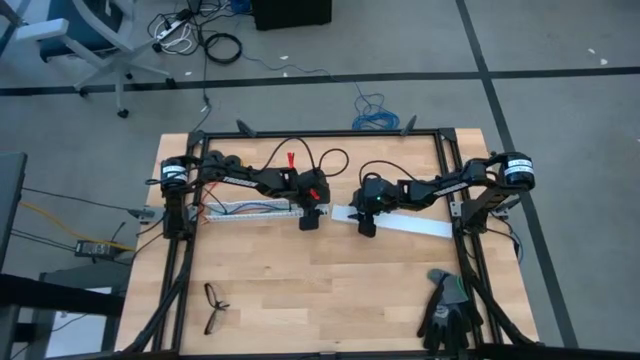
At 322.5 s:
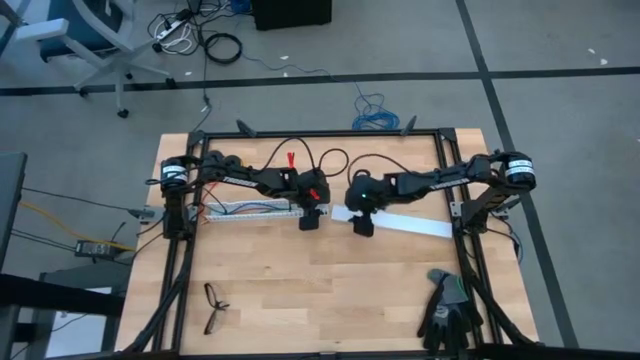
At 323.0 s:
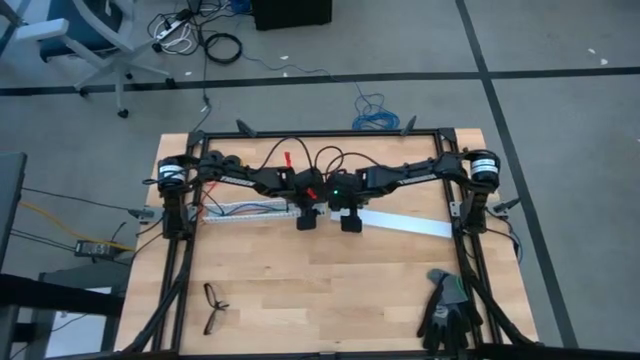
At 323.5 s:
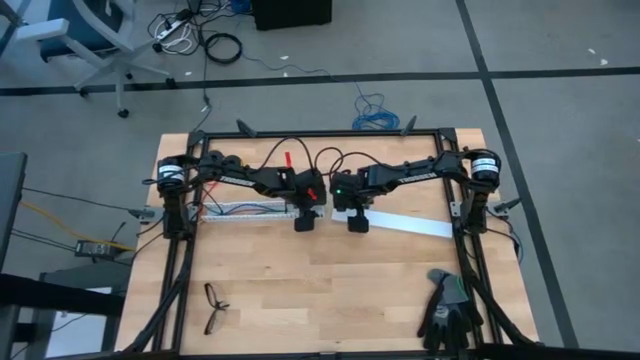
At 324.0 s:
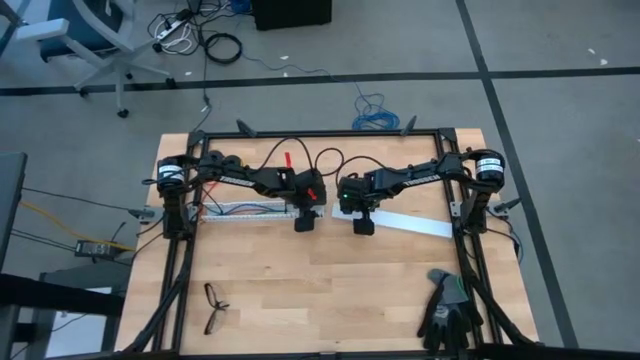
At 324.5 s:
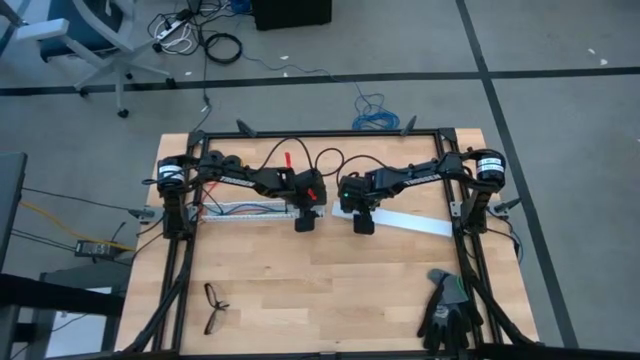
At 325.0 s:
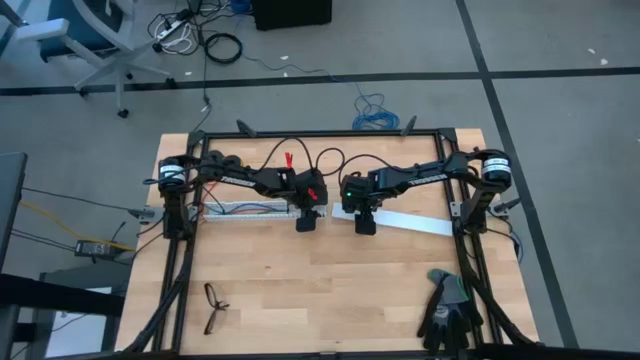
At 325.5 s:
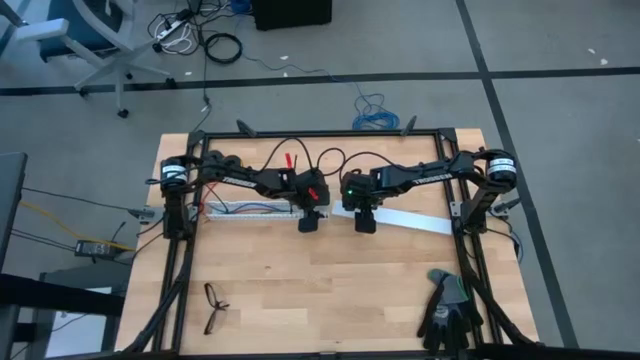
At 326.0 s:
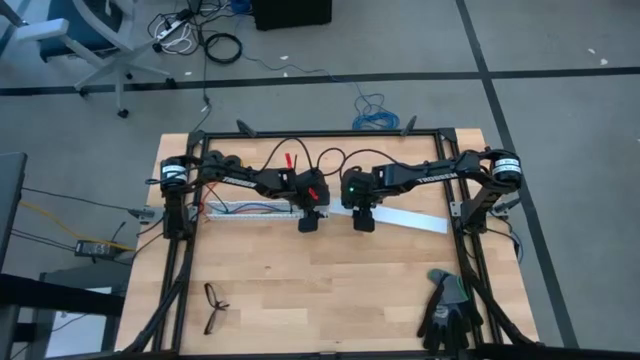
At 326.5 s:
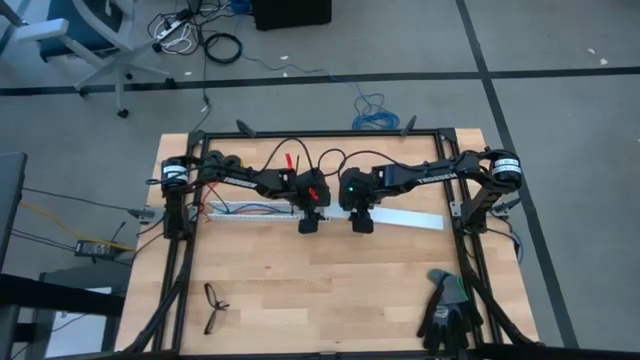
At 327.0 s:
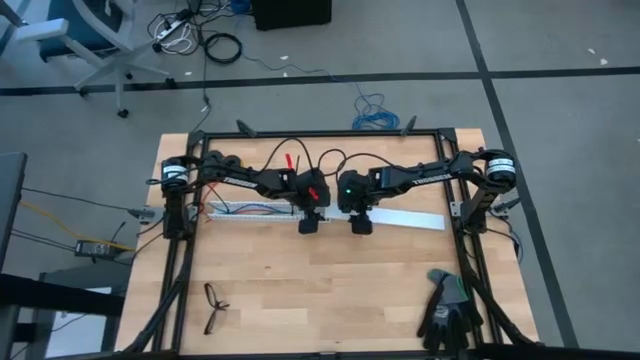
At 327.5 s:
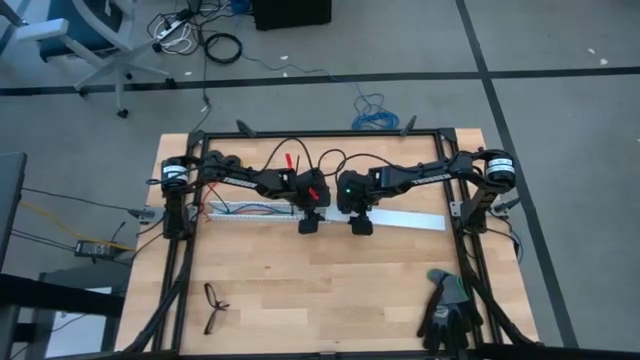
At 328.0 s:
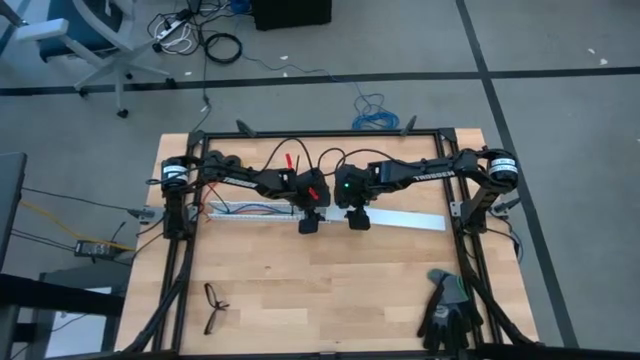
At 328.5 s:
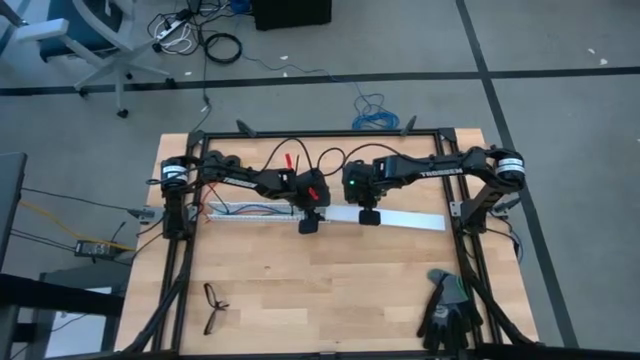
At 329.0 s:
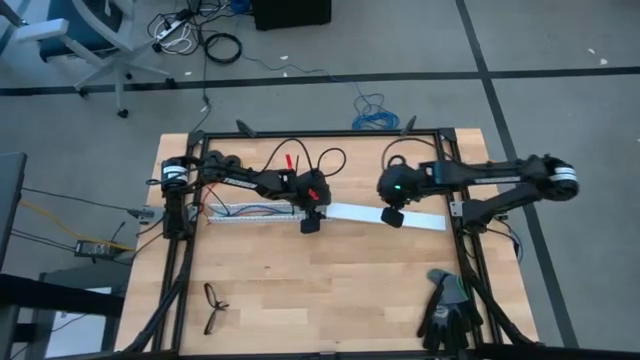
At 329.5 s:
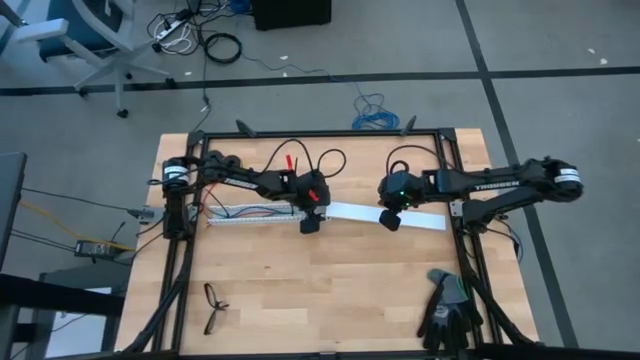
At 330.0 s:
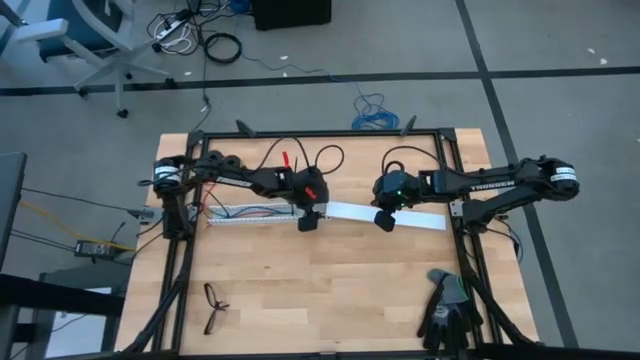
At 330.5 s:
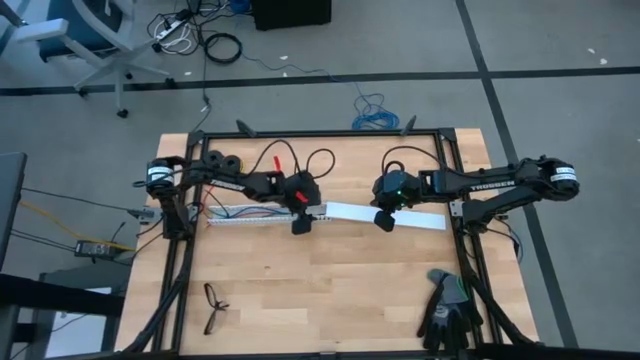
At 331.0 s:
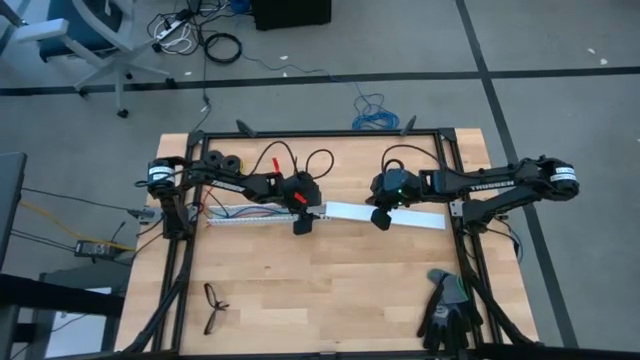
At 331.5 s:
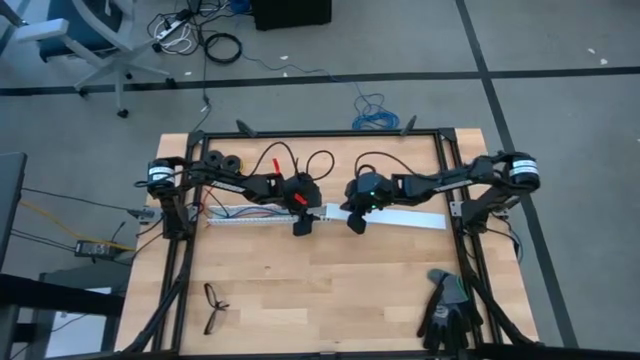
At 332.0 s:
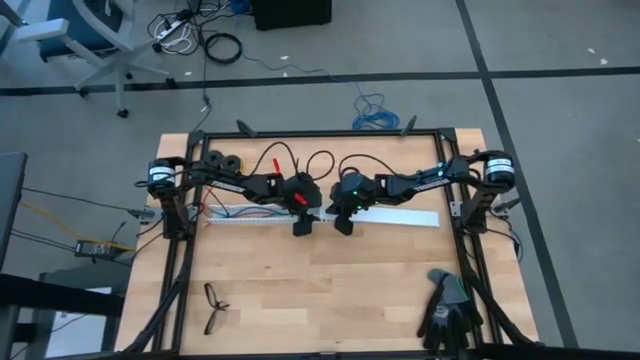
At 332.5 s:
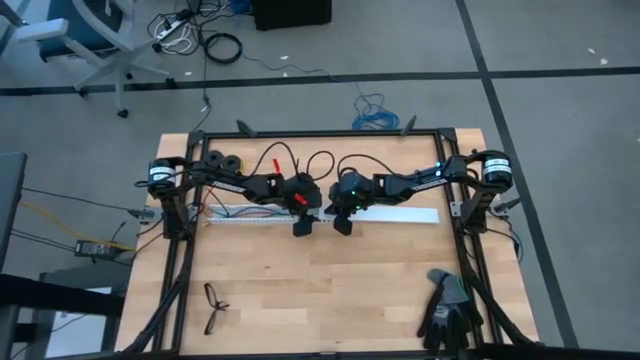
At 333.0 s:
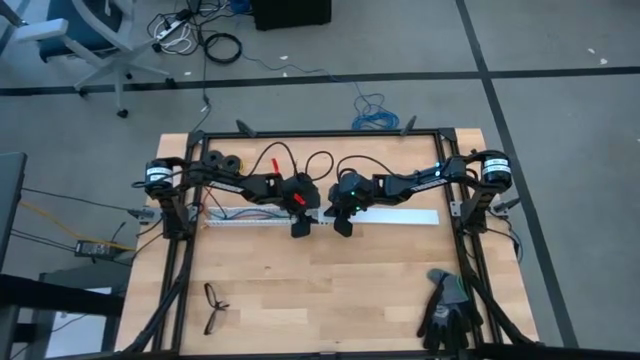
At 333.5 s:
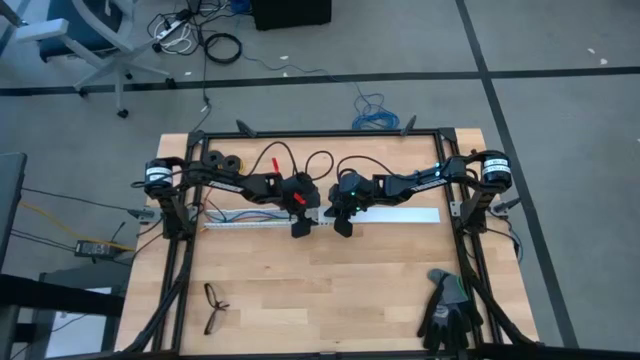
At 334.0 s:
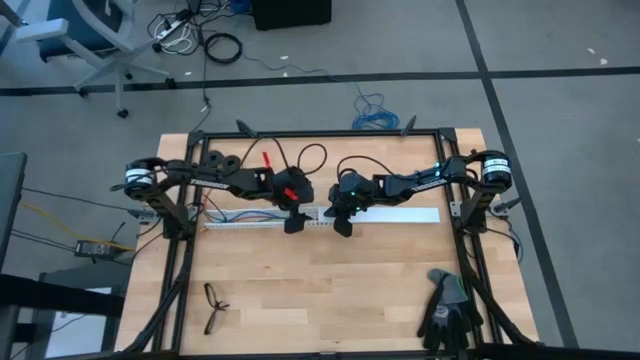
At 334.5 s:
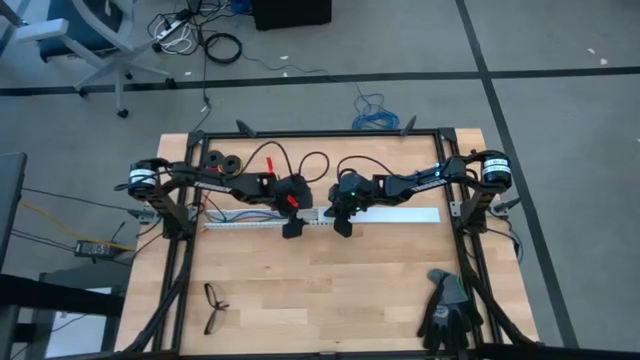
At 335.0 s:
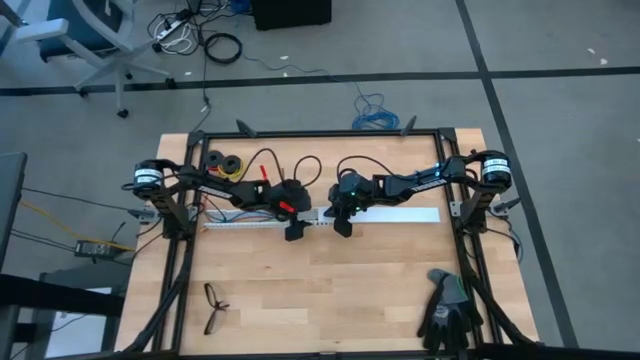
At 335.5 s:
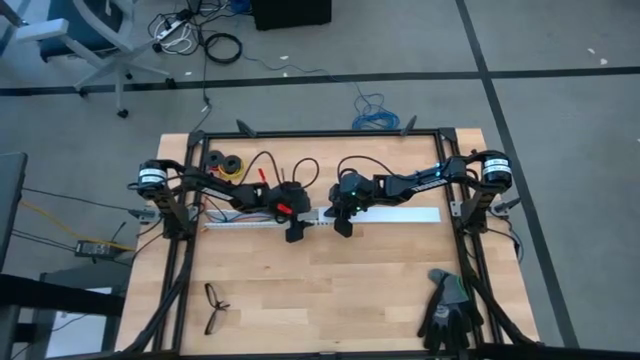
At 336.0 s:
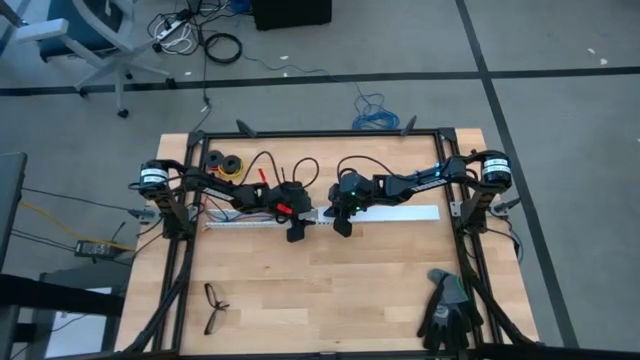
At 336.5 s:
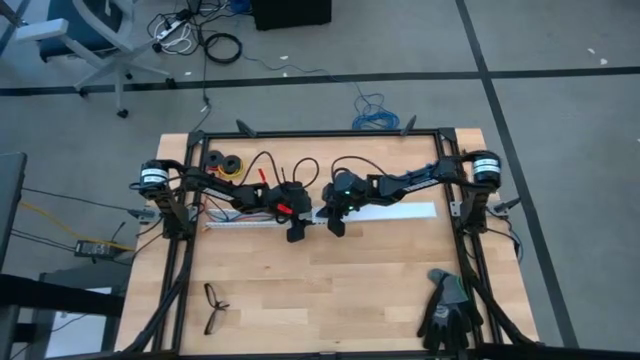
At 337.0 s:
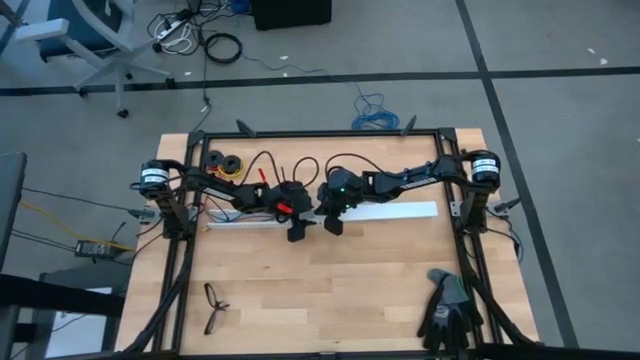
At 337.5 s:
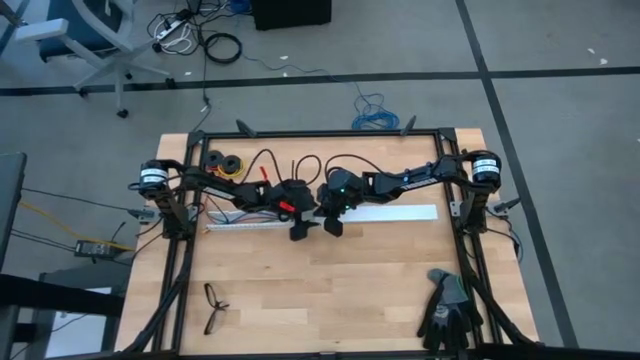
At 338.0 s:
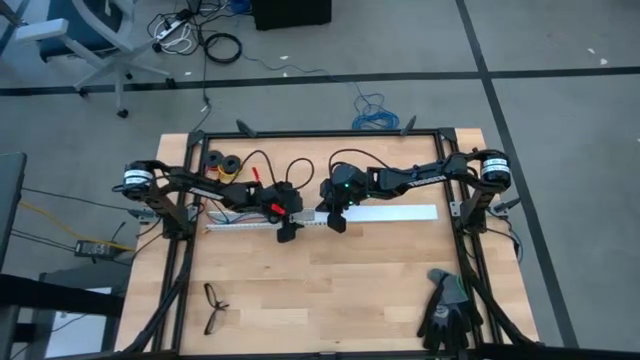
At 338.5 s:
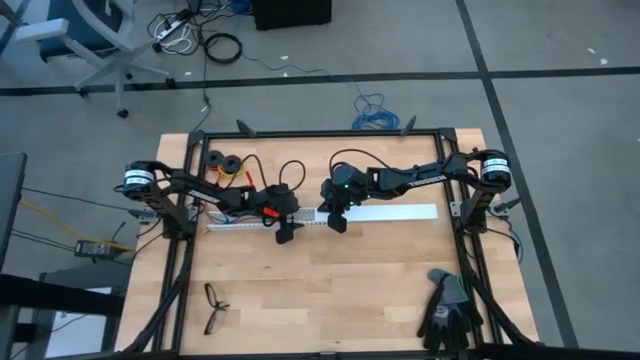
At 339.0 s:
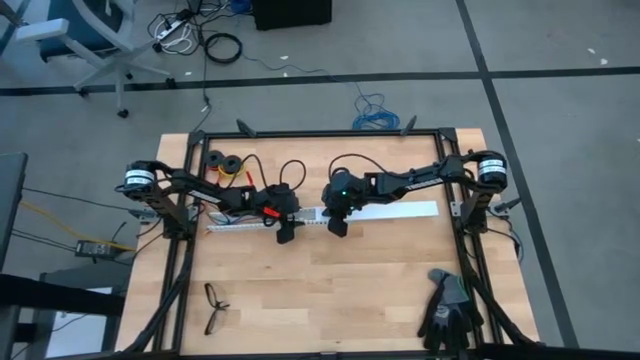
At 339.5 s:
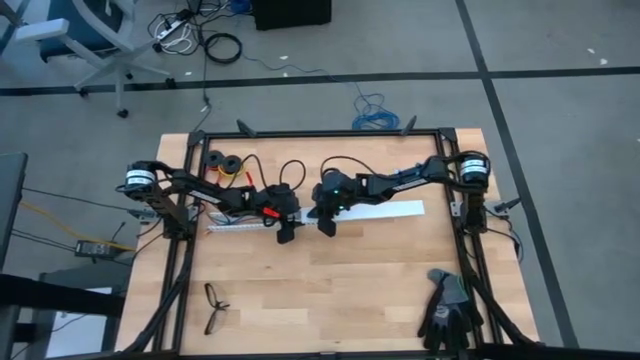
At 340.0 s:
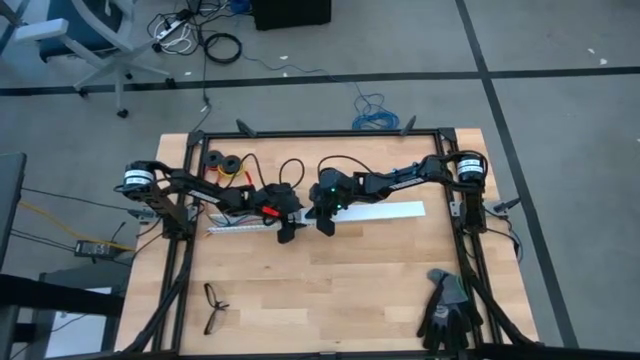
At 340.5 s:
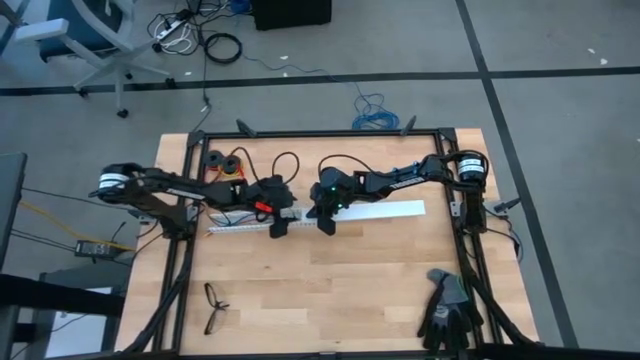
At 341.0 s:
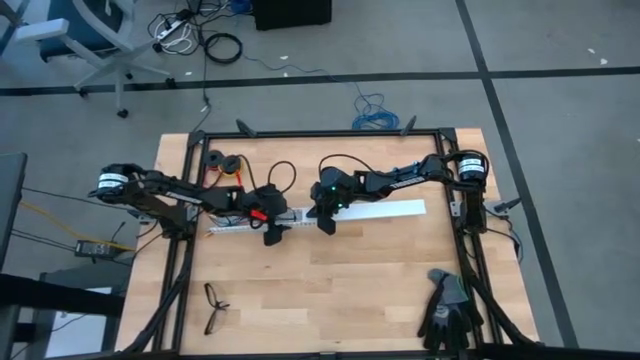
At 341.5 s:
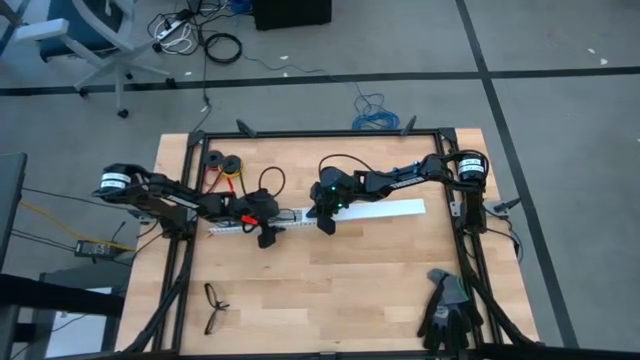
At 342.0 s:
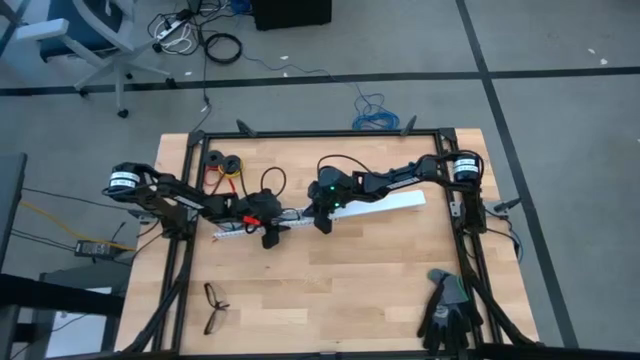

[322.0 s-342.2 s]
Task: Ziptie cables
Close the white cable duct
